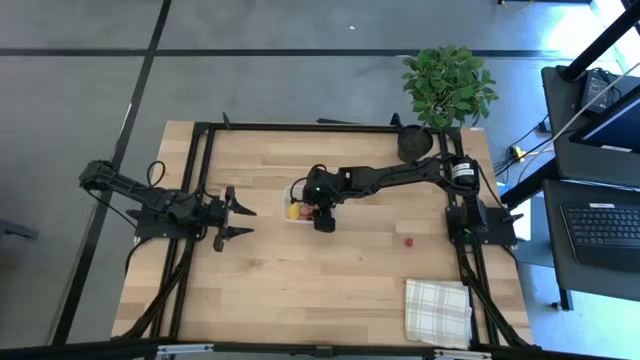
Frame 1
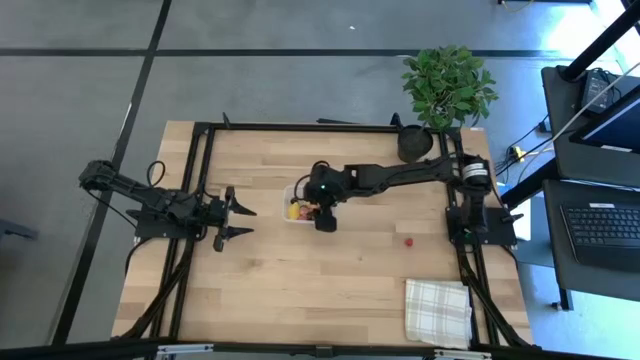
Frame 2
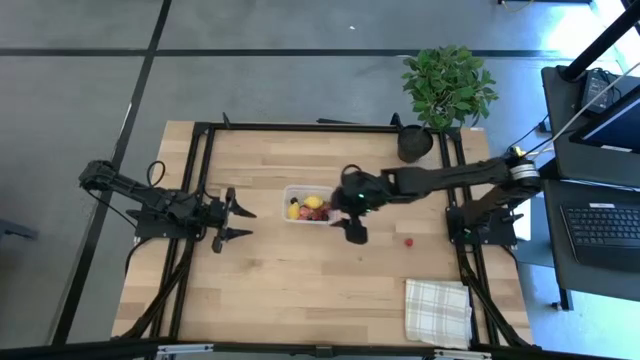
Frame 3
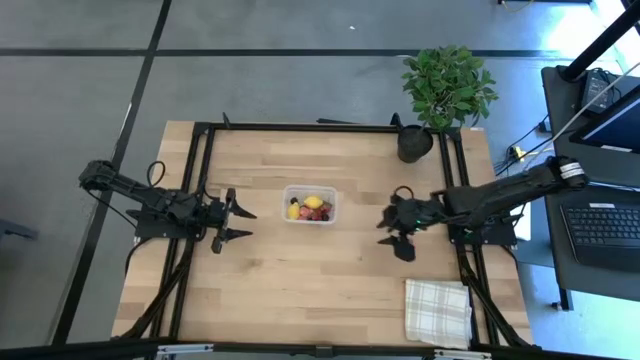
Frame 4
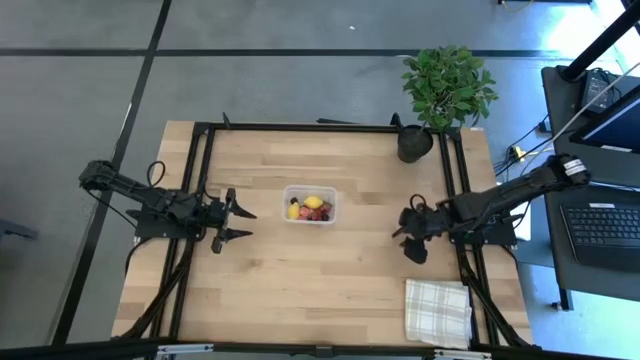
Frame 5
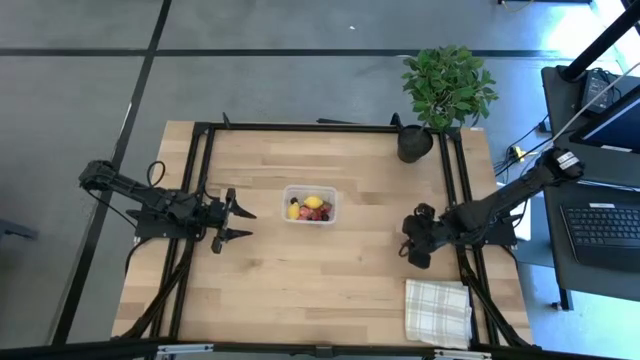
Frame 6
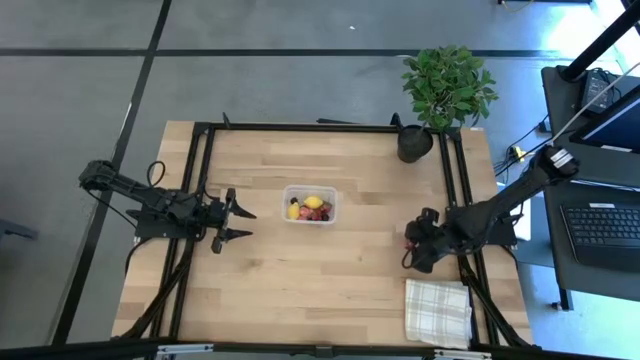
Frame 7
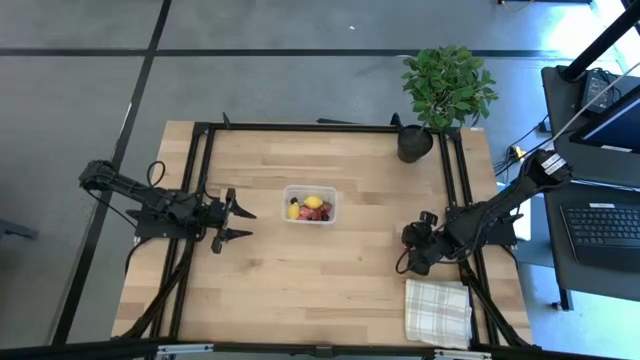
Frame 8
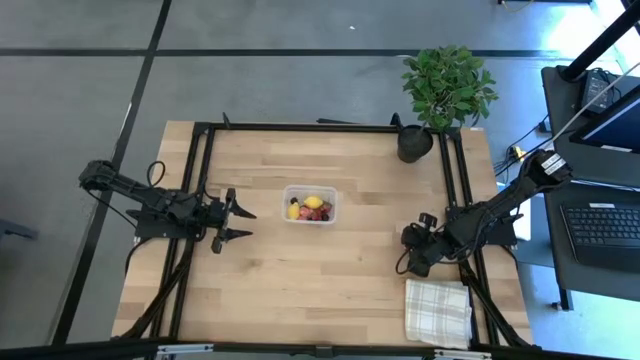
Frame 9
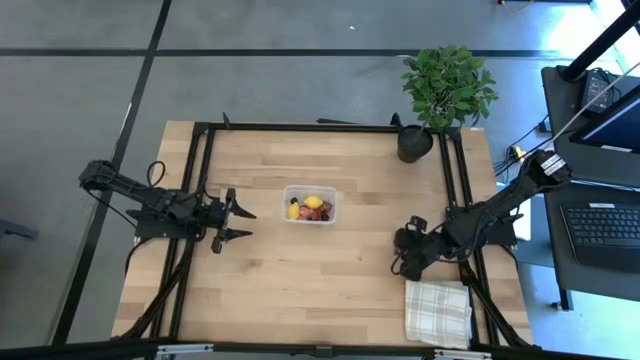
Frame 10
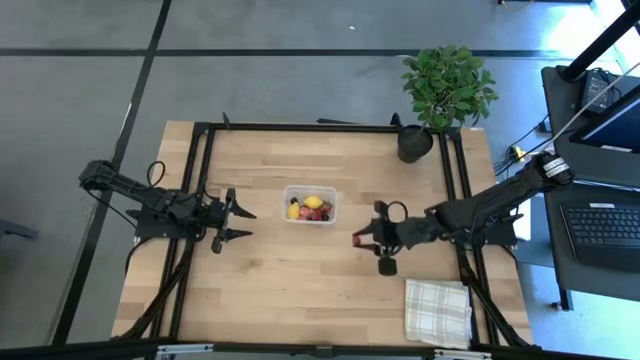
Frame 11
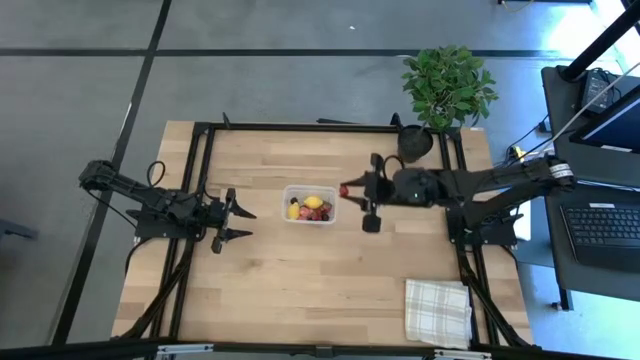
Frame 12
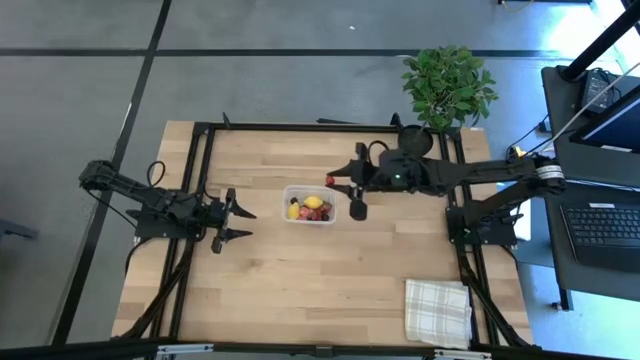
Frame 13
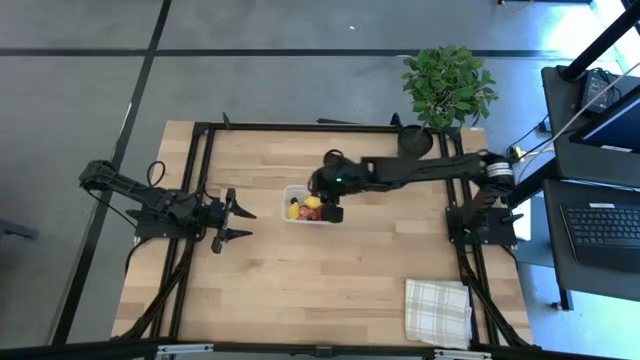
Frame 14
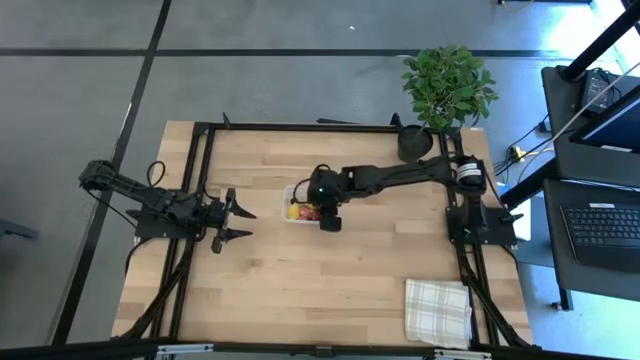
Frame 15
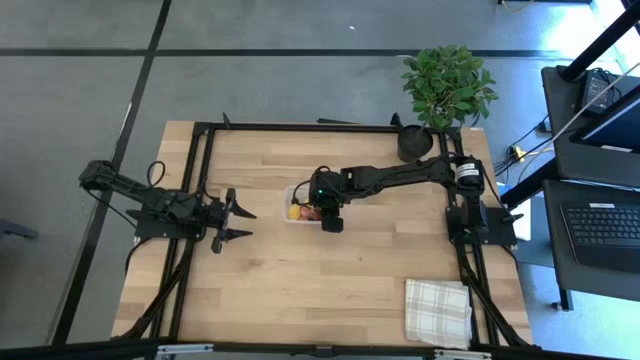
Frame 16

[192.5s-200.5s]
Task: Pick and placing Produce into tupperware
Put the raspberry into the transparent bin

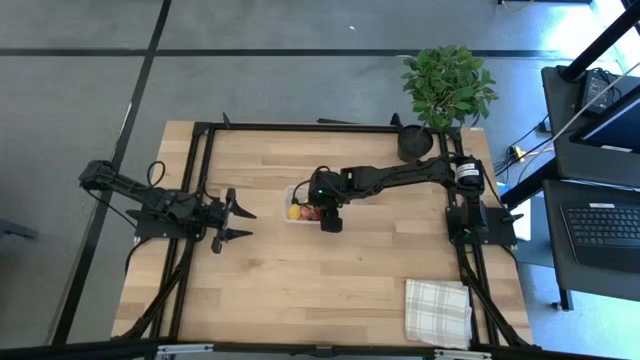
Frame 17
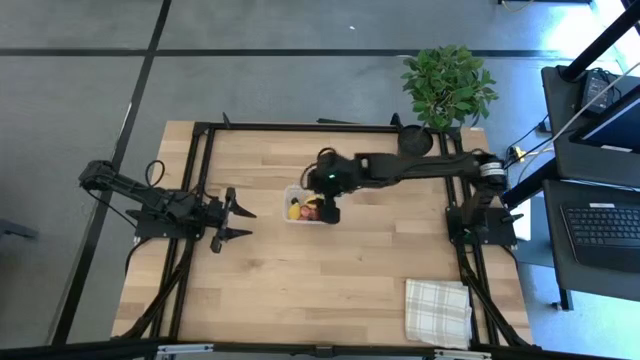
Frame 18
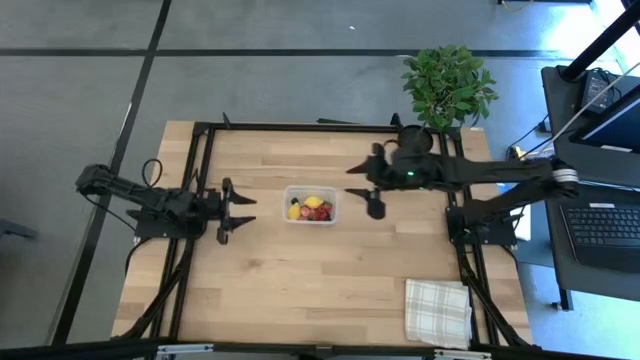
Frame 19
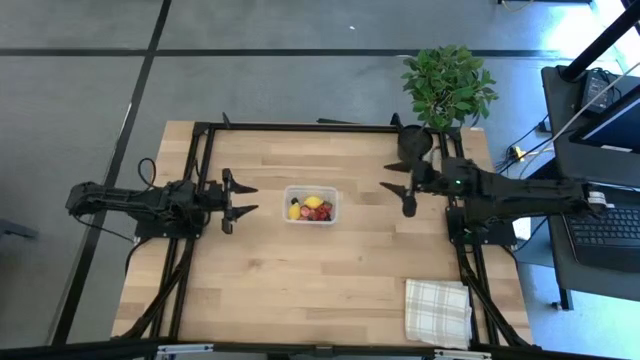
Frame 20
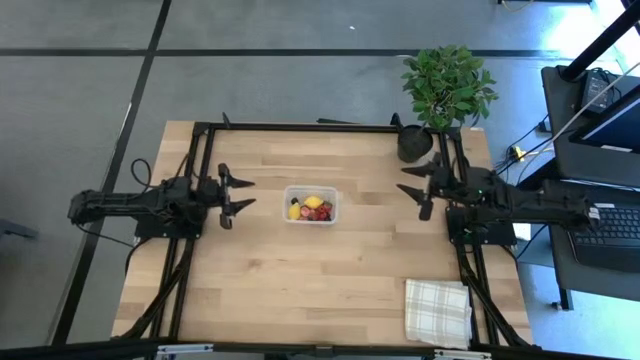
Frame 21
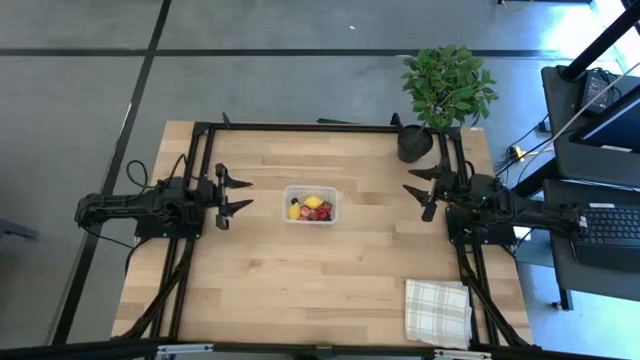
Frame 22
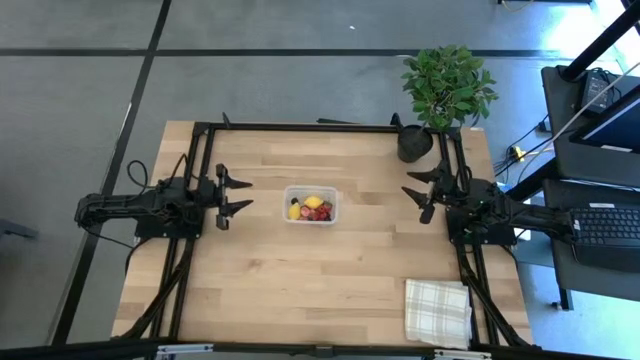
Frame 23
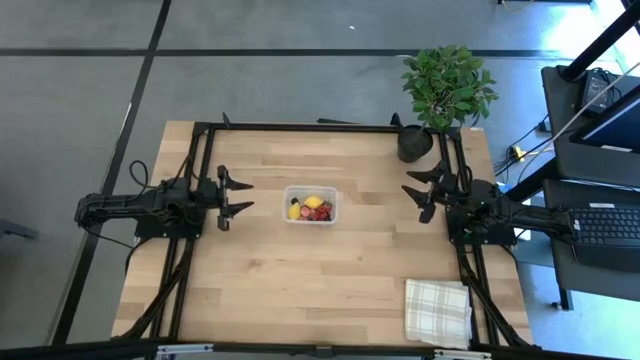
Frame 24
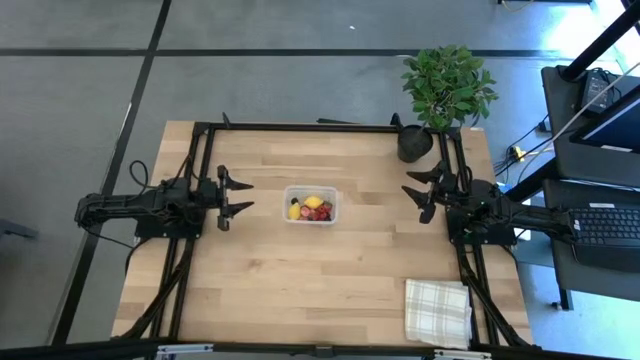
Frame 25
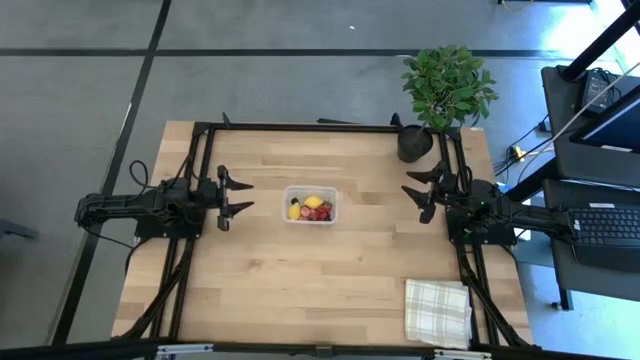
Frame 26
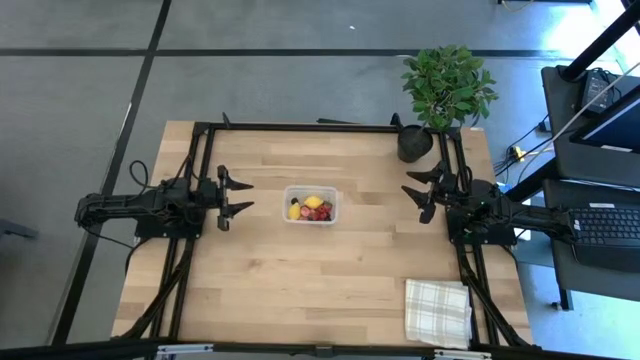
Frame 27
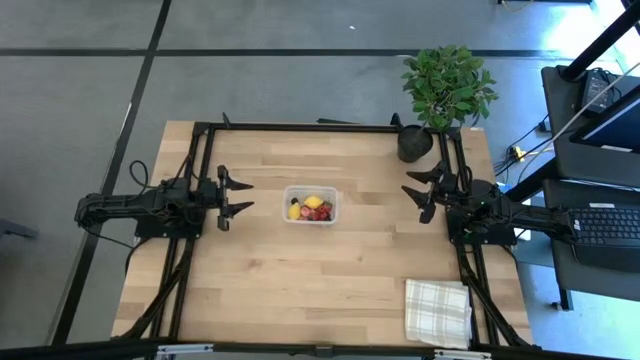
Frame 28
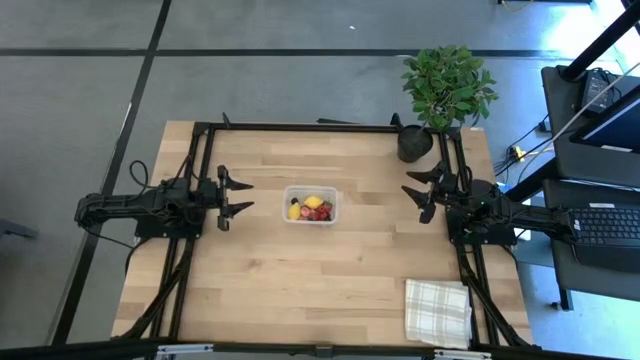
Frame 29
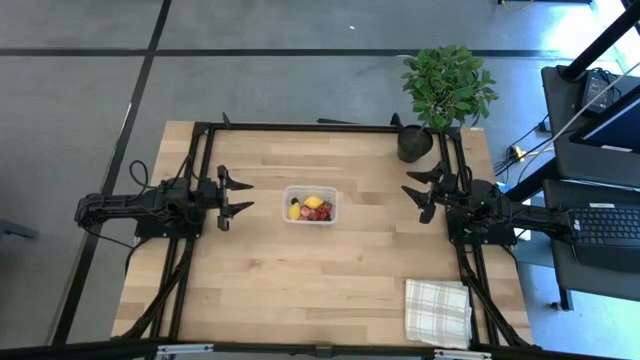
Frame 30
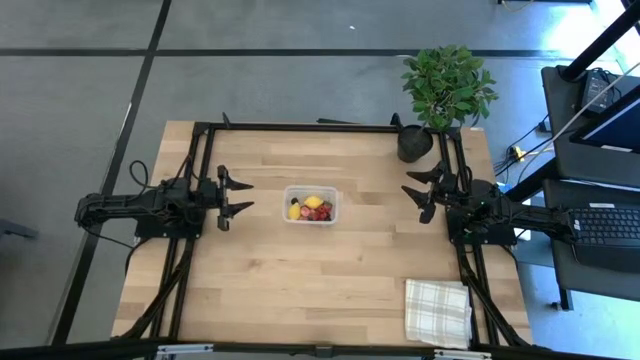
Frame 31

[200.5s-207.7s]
Return to Home Position

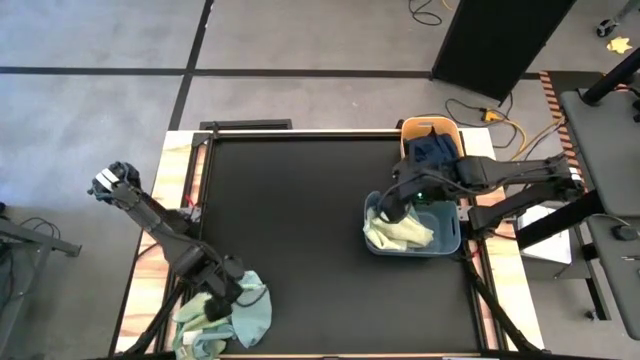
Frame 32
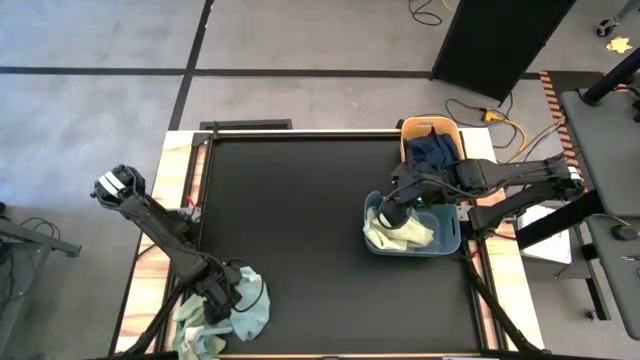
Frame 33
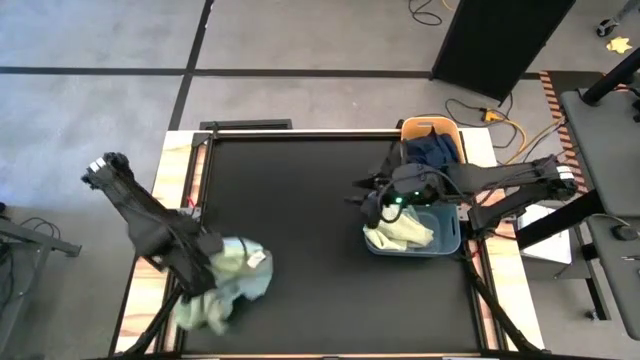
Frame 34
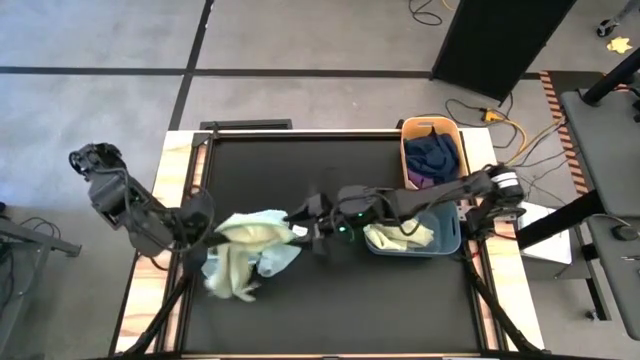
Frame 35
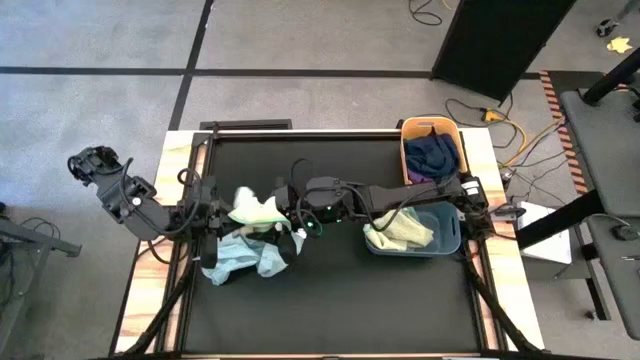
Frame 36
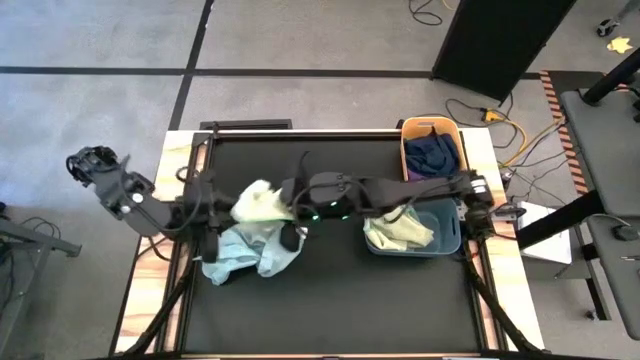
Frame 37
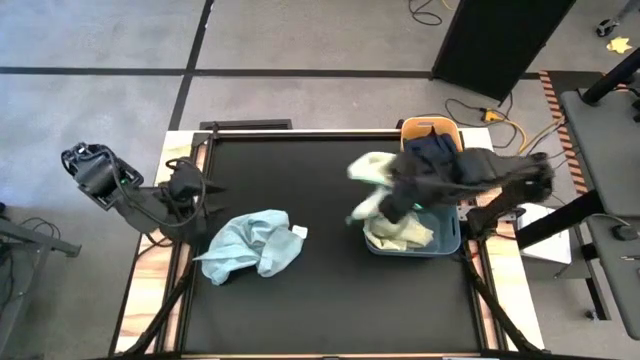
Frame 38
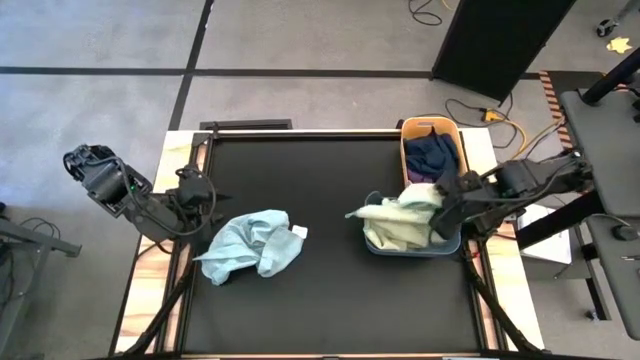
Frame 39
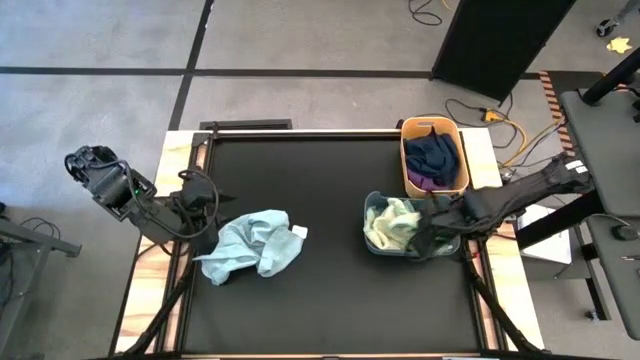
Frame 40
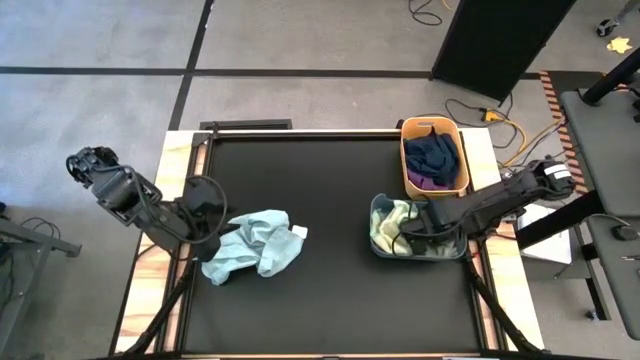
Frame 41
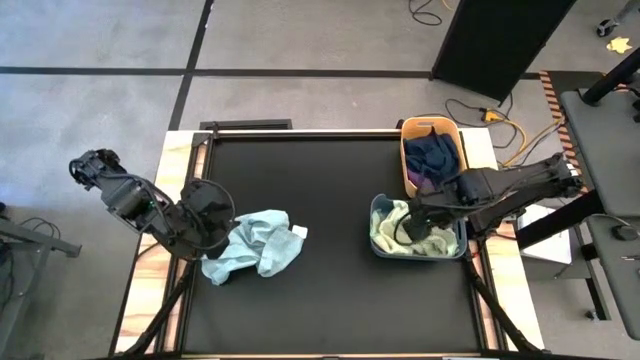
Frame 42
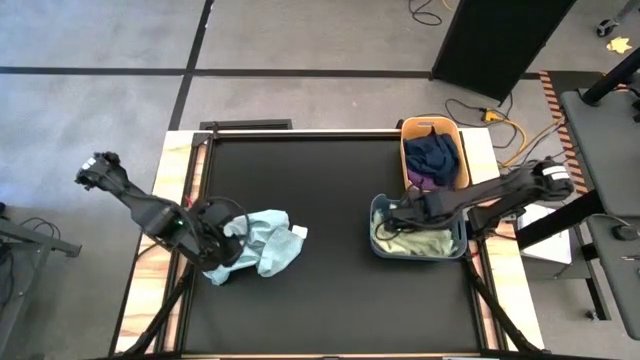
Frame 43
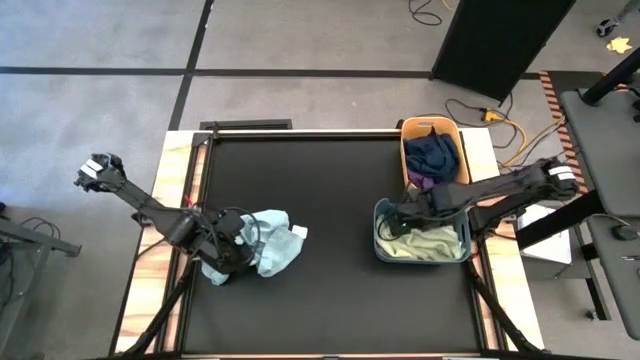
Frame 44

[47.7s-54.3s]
Task: Sort towels by color in basket
Put the light green towel into the gray bin
